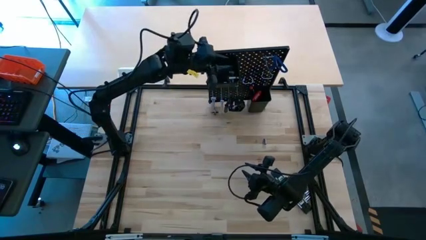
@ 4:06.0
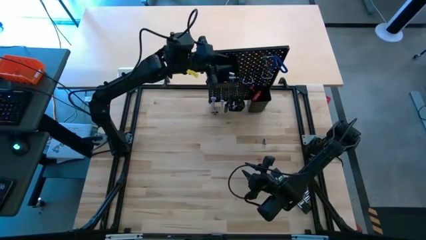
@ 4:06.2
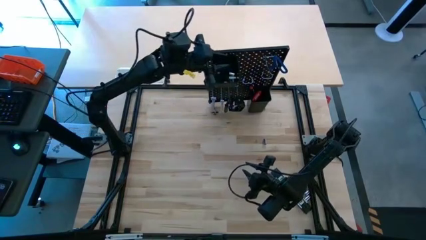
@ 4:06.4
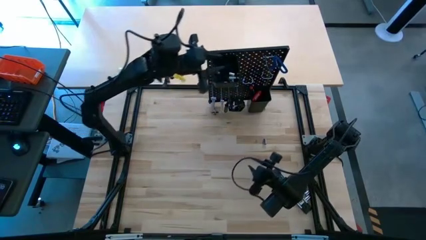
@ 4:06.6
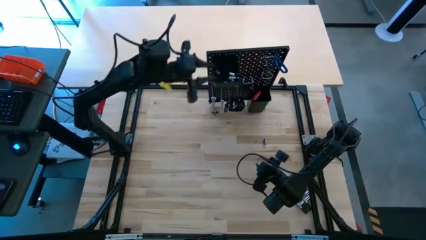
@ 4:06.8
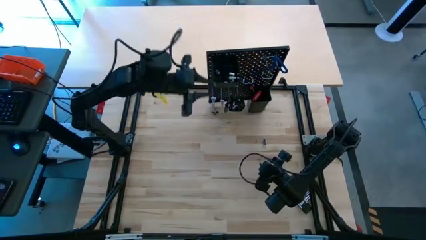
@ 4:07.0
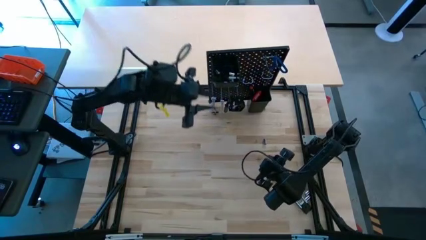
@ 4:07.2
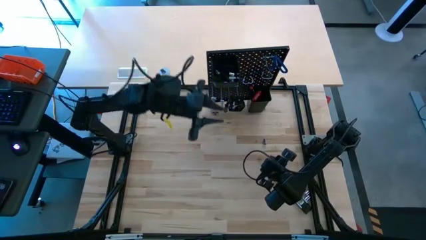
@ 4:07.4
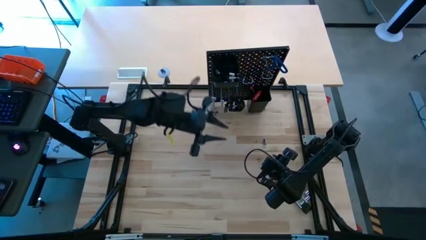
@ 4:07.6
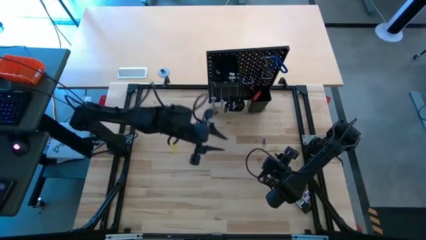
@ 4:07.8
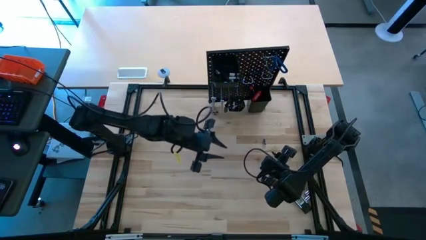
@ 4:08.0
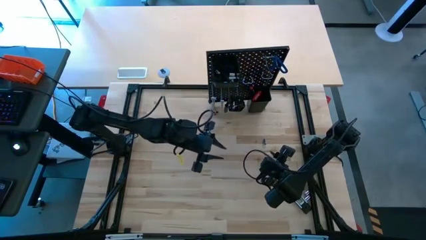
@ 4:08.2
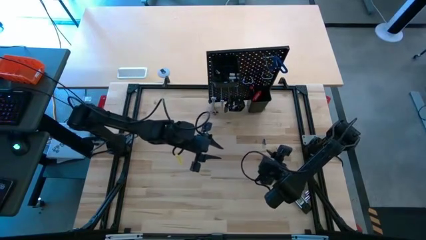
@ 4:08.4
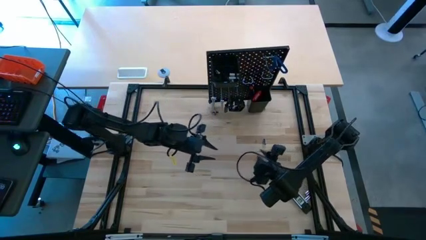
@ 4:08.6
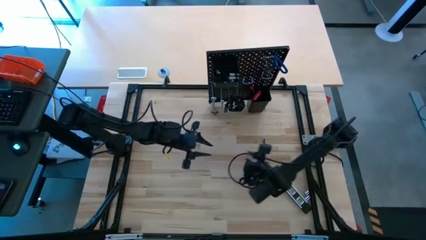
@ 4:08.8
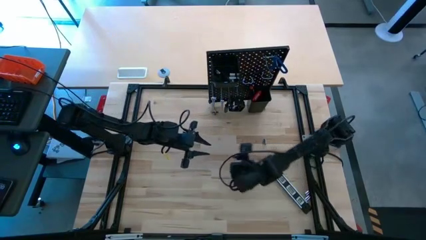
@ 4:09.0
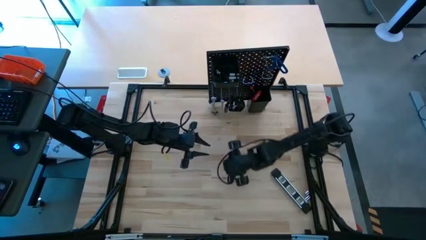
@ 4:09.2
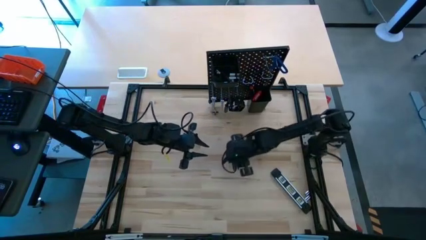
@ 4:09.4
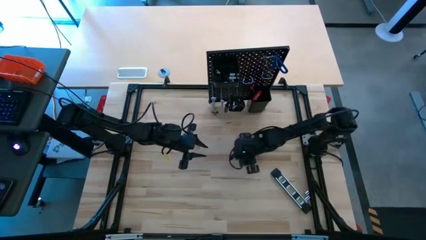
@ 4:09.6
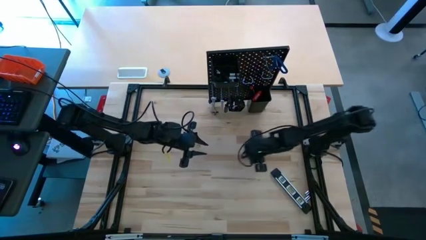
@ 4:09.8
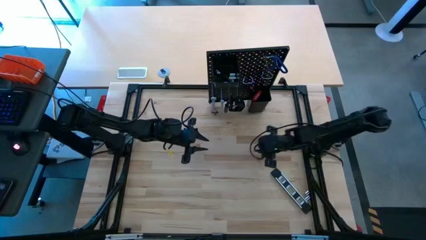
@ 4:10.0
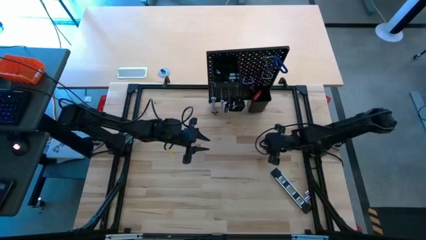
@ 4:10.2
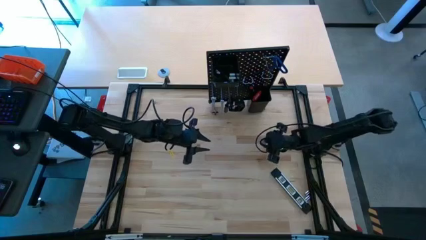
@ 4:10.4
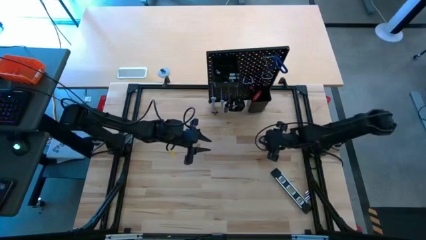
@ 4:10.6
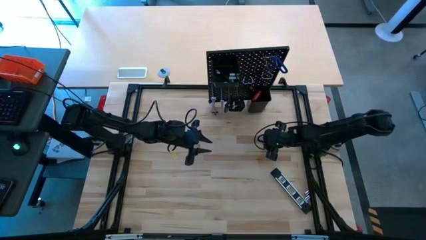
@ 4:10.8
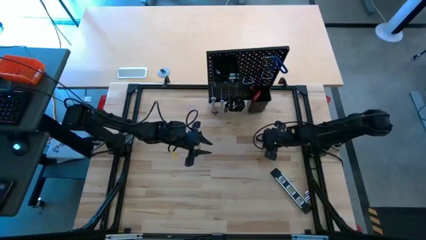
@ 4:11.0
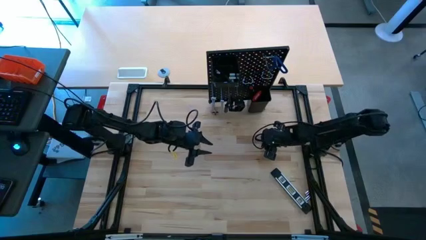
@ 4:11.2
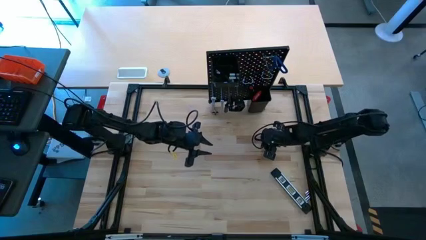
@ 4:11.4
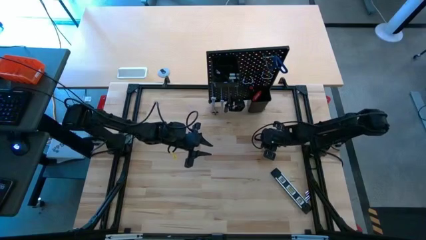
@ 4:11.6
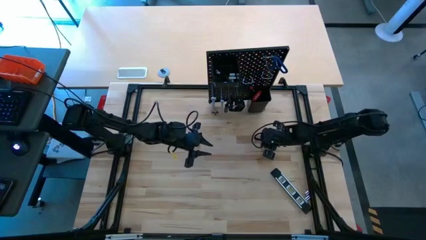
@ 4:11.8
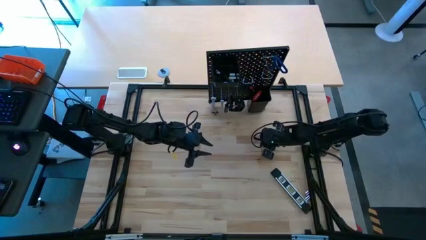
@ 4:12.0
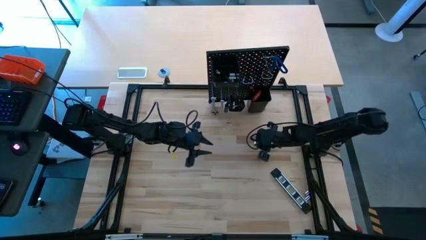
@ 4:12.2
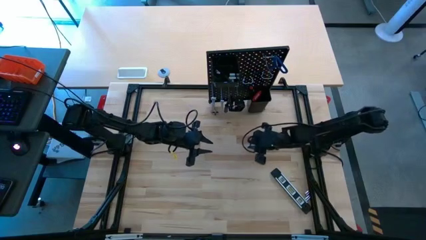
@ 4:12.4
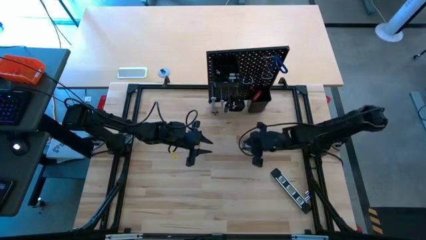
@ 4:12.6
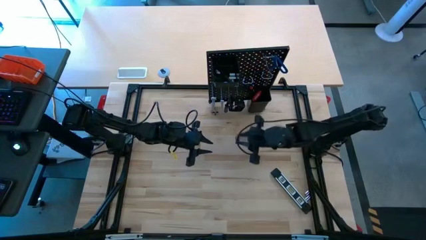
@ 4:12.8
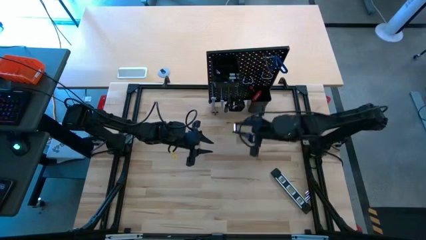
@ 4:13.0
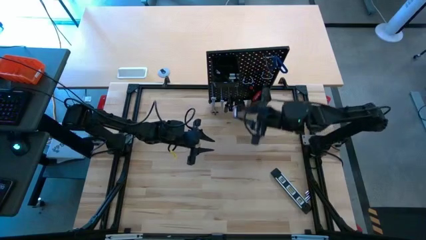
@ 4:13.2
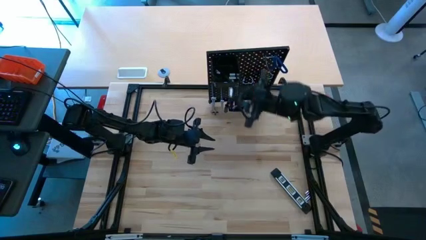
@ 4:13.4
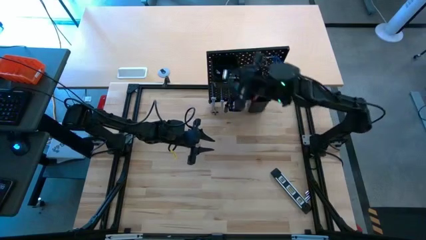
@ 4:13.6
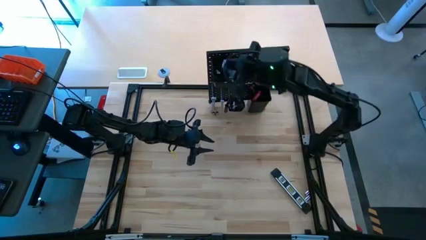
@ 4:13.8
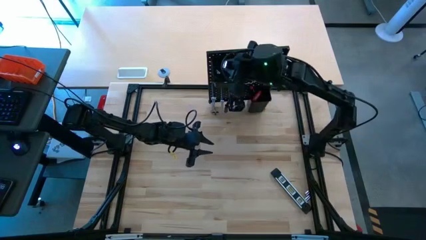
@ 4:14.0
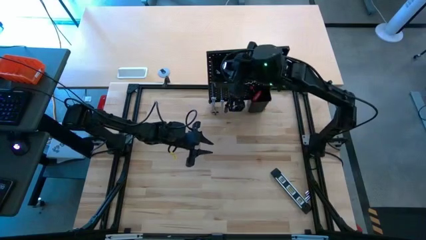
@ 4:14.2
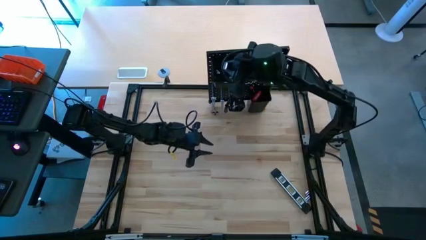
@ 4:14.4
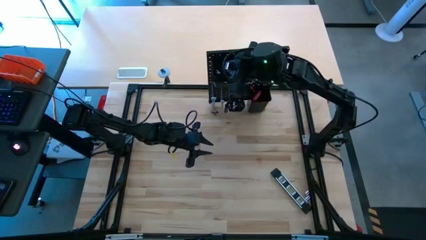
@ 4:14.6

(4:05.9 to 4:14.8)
Task: Hang tools onto peg board
Put the silver socket into the top black bin on the peg board

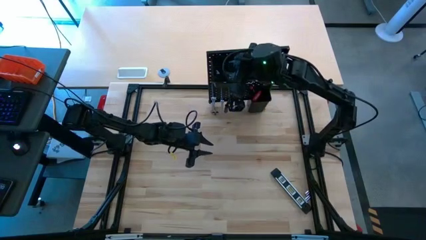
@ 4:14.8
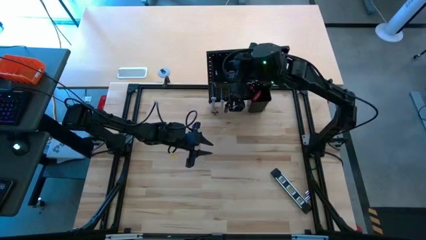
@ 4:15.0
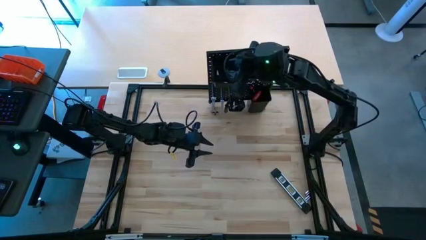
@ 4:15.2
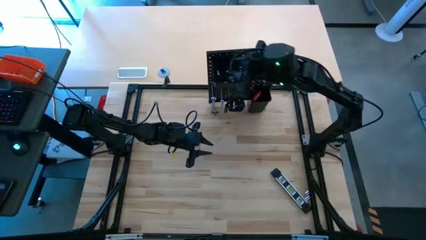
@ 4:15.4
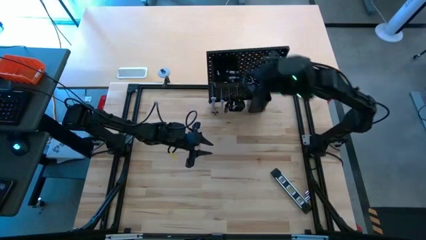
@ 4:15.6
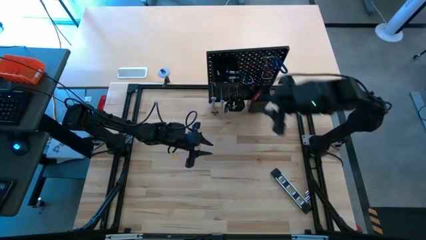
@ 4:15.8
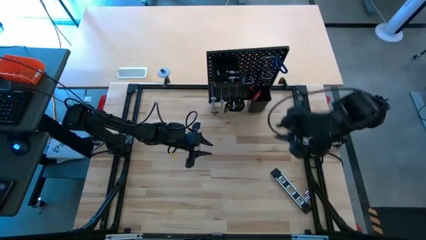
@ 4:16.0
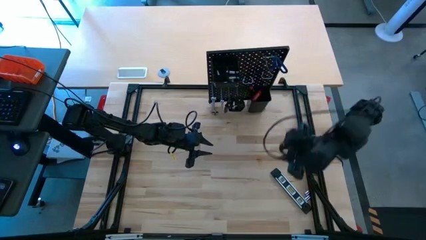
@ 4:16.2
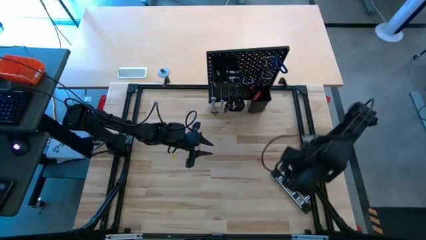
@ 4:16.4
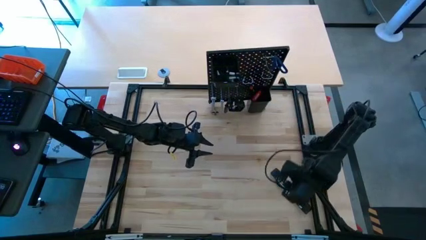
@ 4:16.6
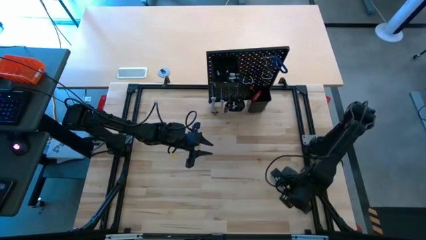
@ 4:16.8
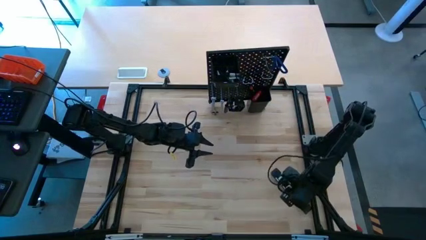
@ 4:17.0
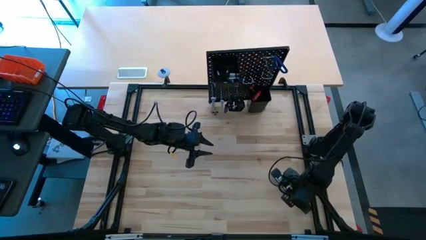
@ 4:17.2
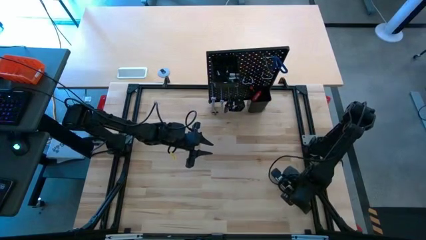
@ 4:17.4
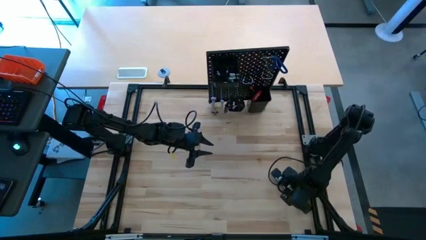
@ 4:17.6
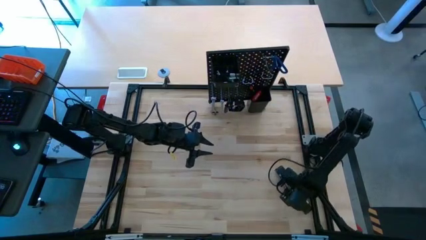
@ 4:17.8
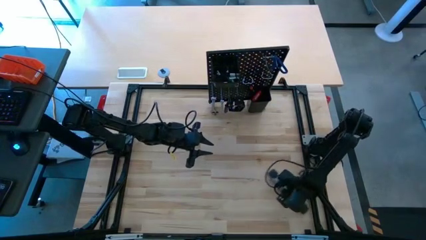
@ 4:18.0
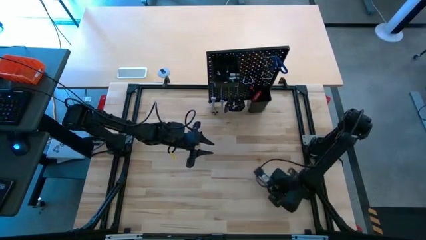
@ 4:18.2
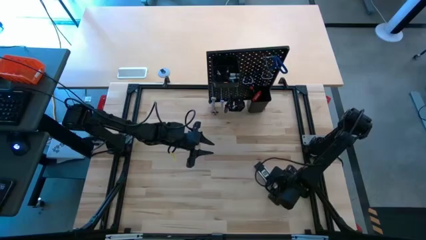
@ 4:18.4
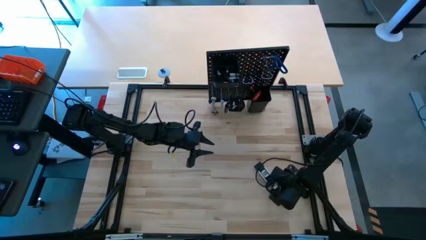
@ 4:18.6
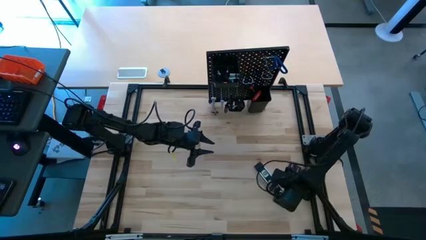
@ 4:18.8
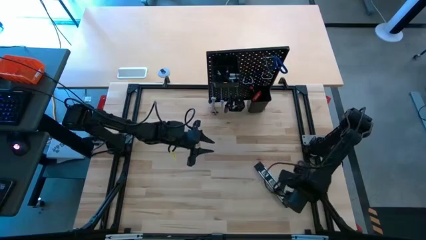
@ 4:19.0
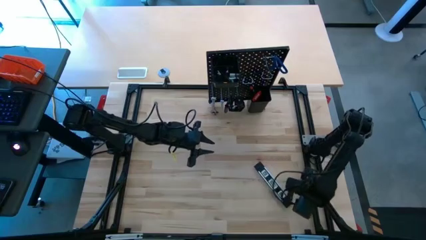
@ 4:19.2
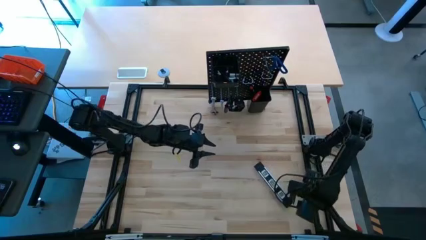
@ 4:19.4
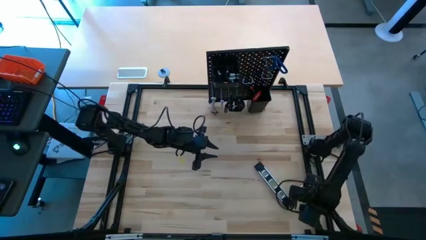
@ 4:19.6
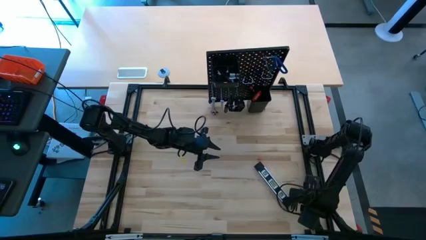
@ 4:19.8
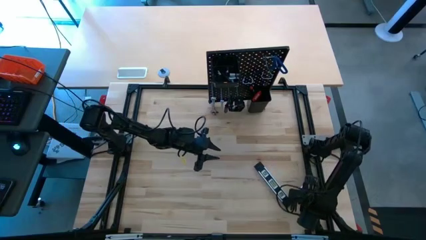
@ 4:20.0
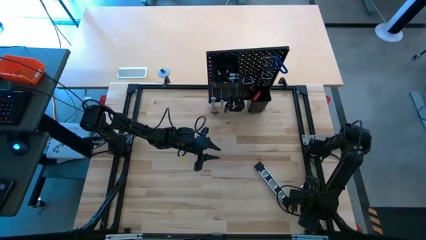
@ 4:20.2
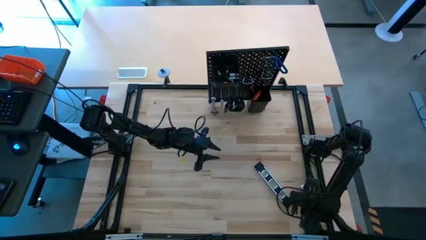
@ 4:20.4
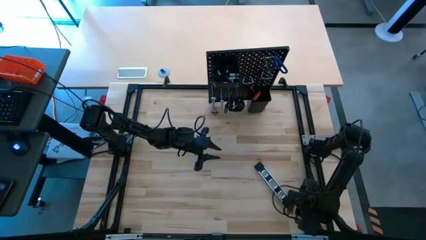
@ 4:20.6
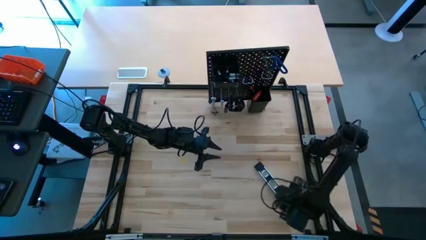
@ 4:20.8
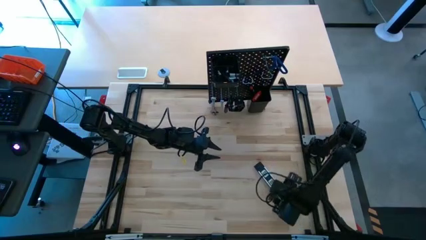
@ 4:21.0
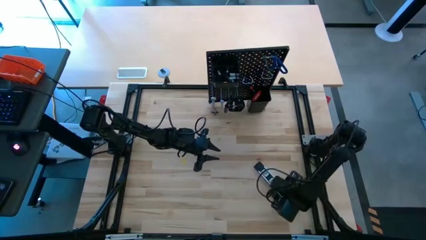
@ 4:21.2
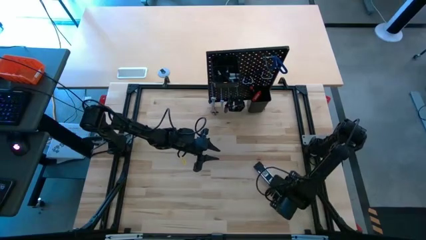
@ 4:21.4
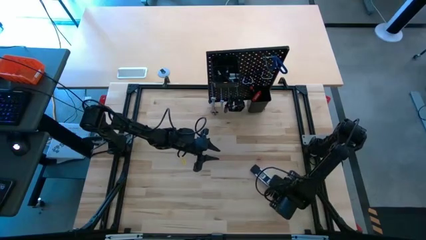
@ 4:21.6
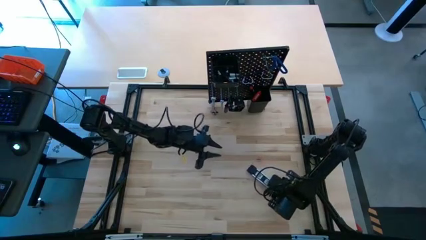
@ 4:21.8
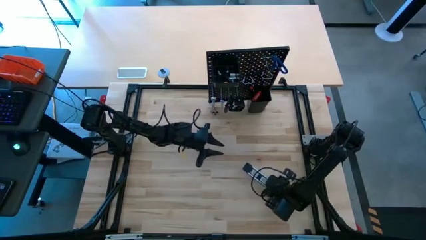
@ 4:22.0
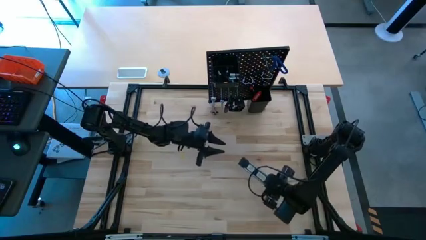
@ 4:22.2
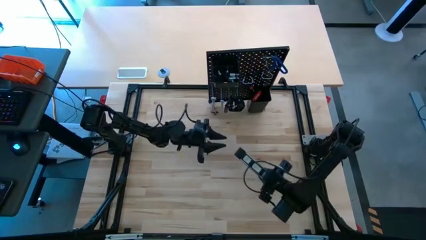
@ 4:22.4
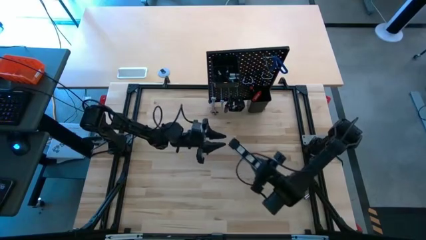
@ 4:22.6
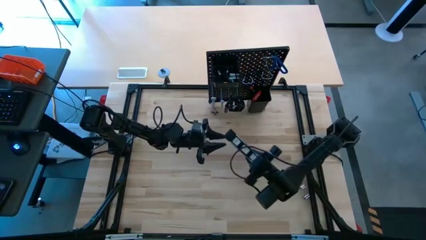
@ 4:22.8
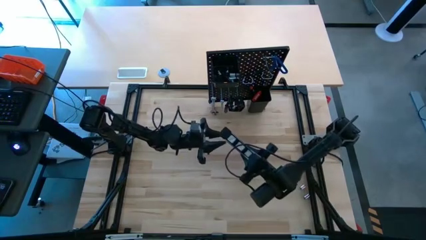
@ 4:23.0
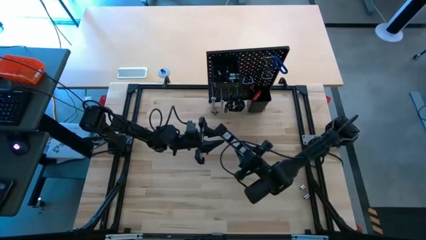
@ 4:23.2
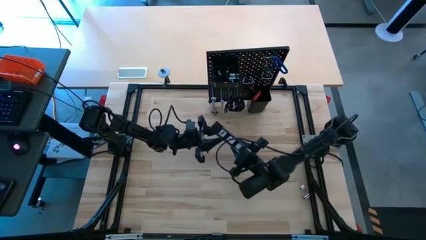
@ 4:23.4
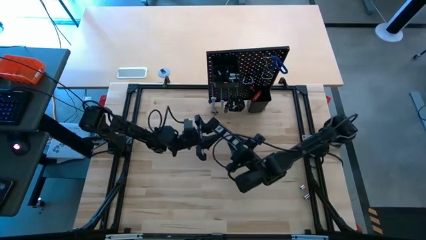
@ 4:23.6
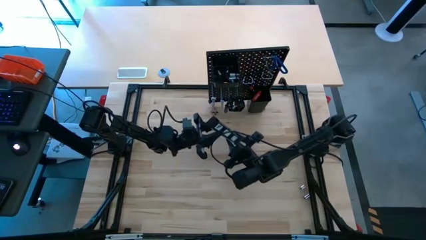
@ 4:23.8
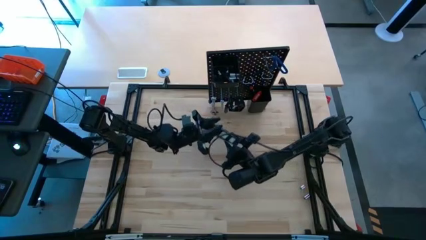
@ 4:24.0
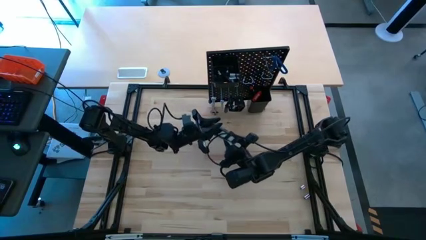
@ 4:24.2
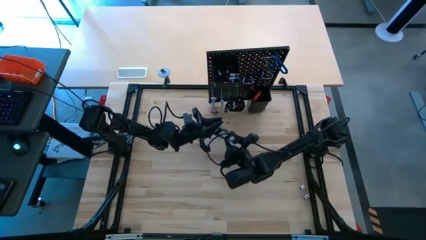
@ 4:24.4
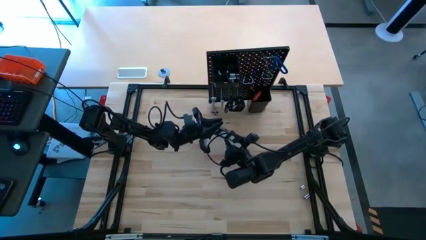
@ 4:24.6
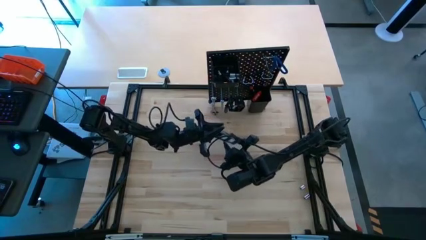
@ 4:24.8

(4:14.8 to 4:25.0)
Put the black spirit level into the bottom black bin on the peg board
